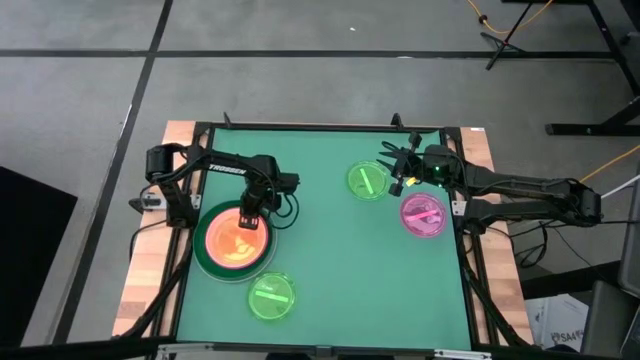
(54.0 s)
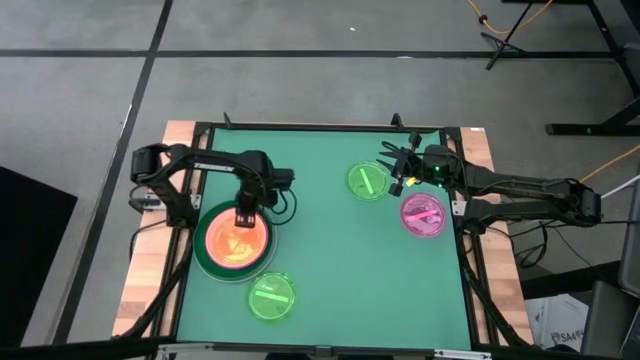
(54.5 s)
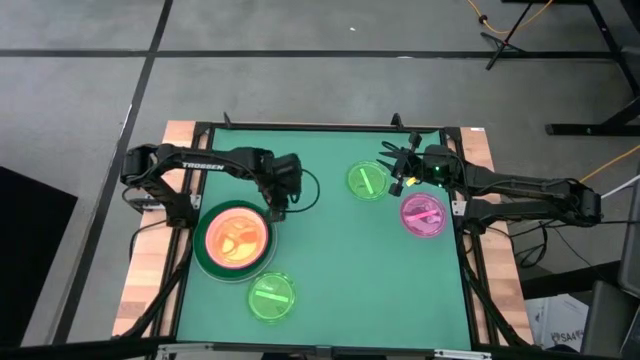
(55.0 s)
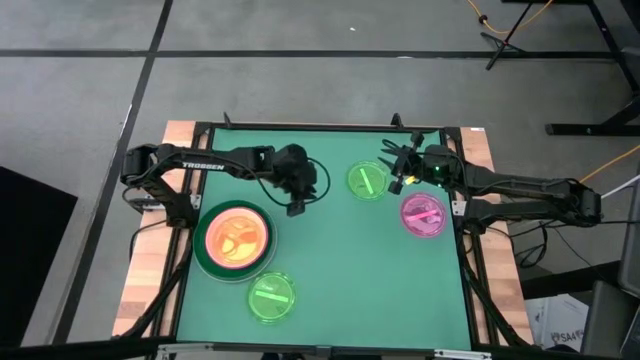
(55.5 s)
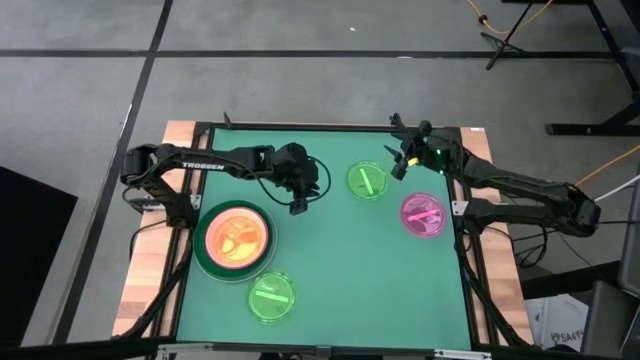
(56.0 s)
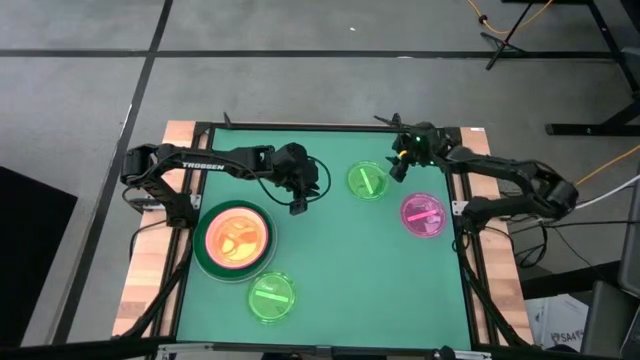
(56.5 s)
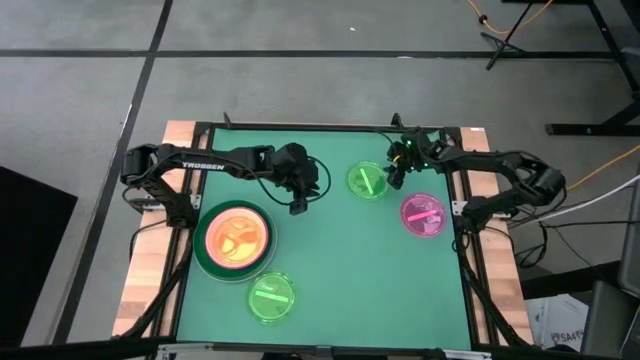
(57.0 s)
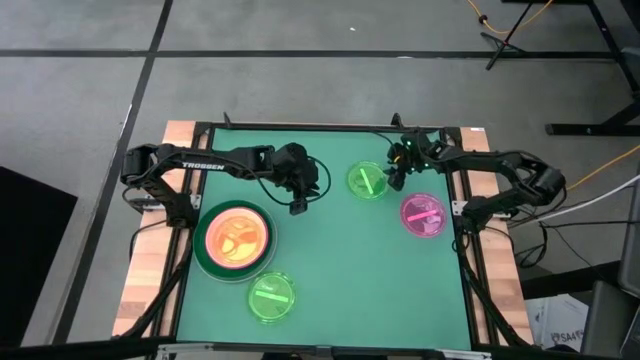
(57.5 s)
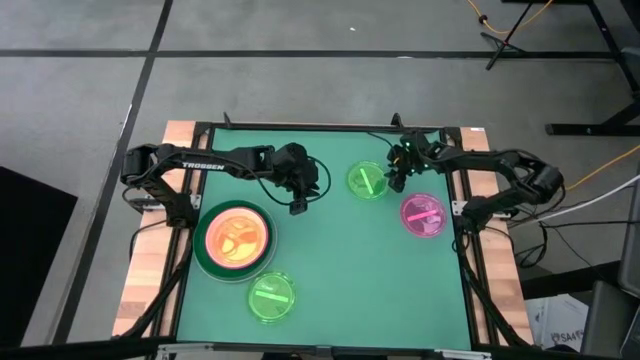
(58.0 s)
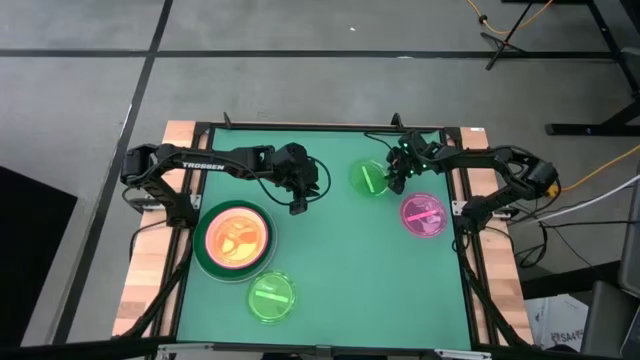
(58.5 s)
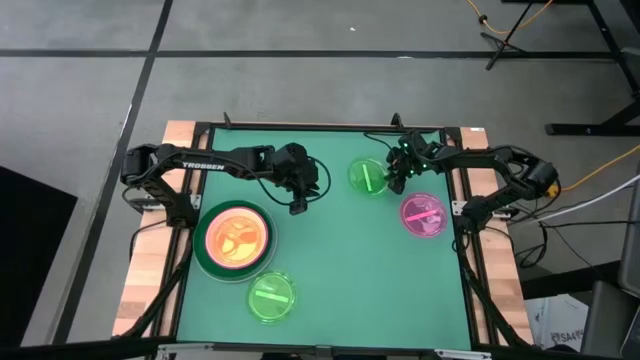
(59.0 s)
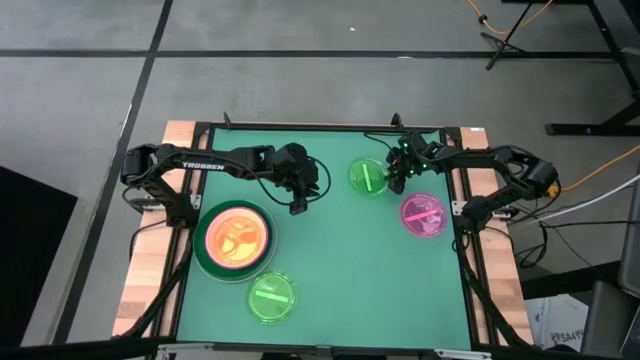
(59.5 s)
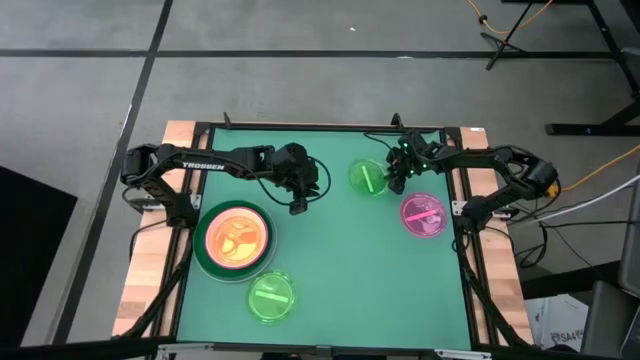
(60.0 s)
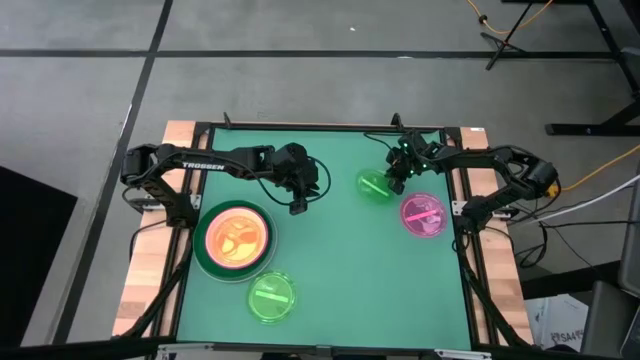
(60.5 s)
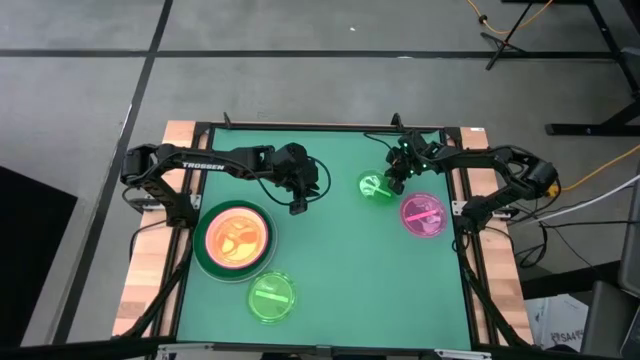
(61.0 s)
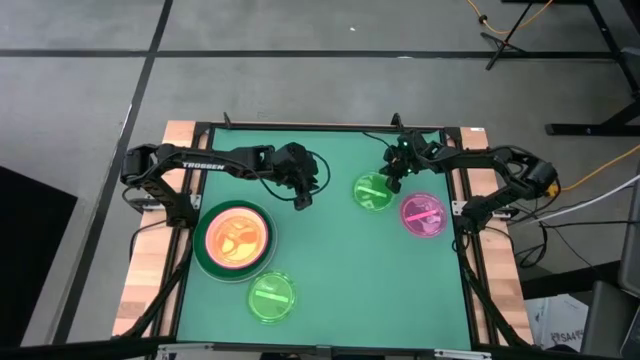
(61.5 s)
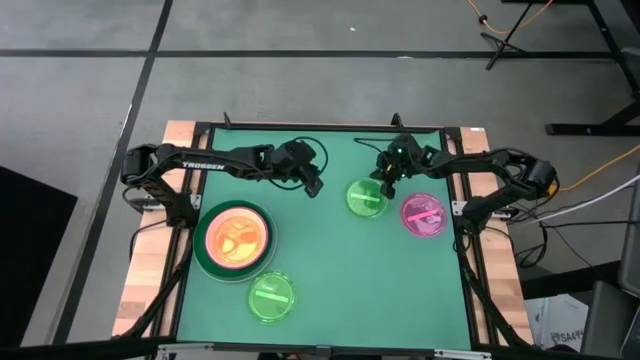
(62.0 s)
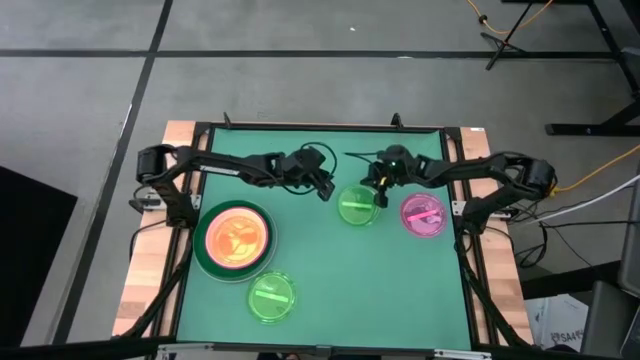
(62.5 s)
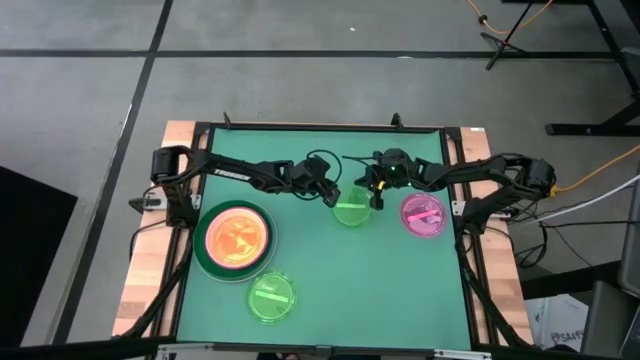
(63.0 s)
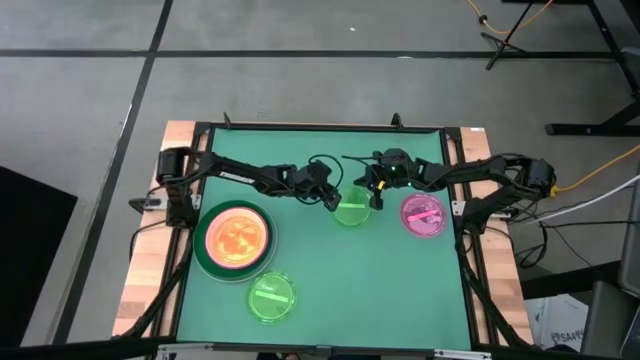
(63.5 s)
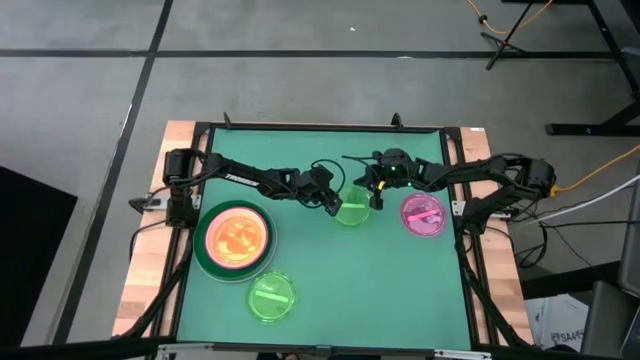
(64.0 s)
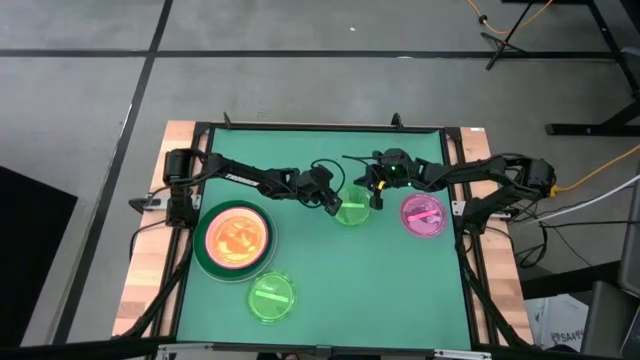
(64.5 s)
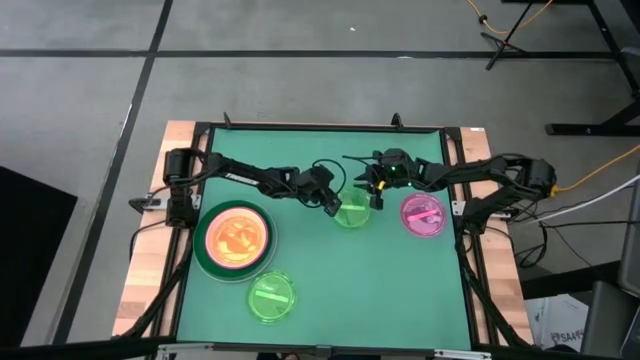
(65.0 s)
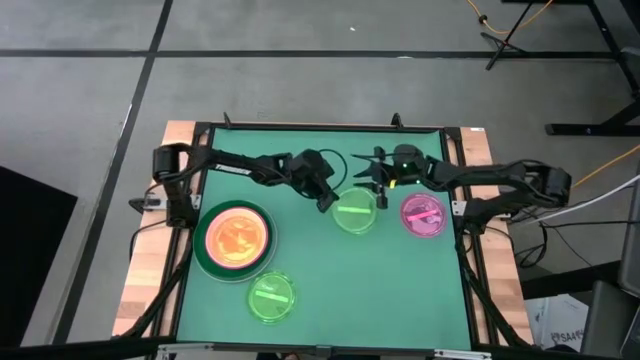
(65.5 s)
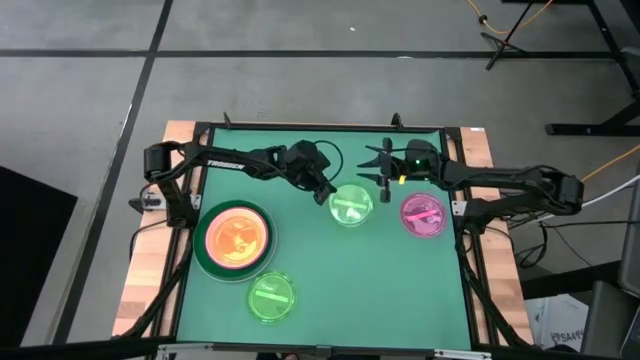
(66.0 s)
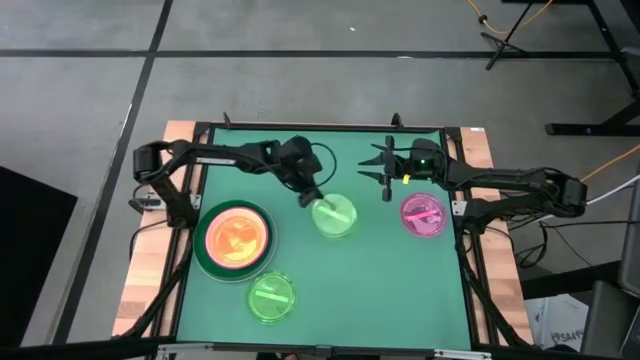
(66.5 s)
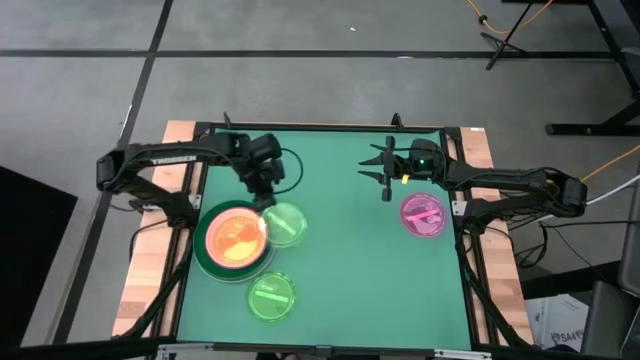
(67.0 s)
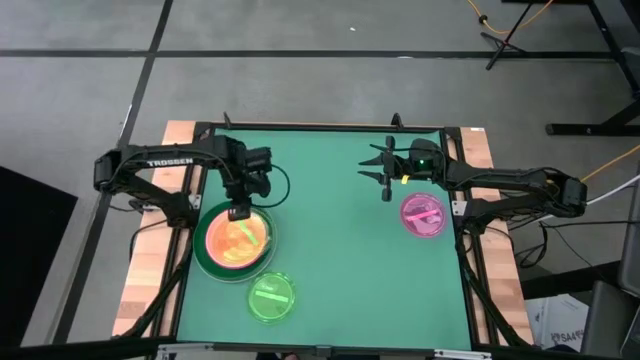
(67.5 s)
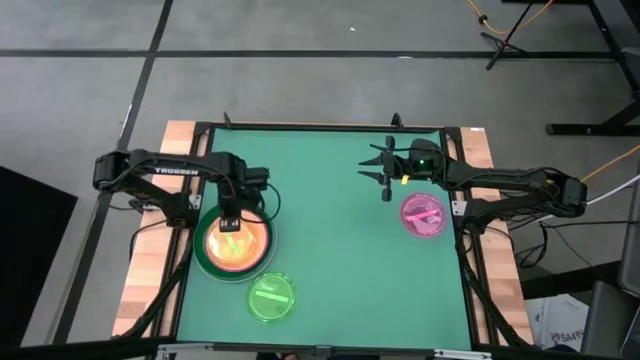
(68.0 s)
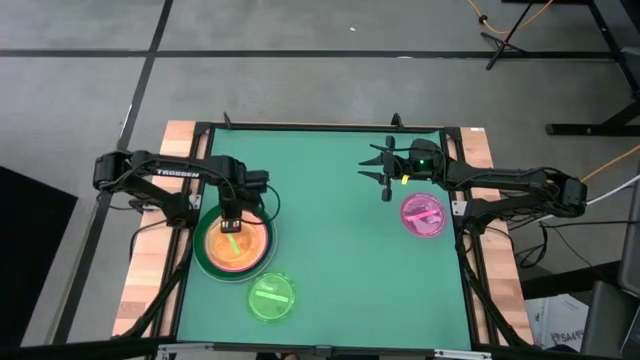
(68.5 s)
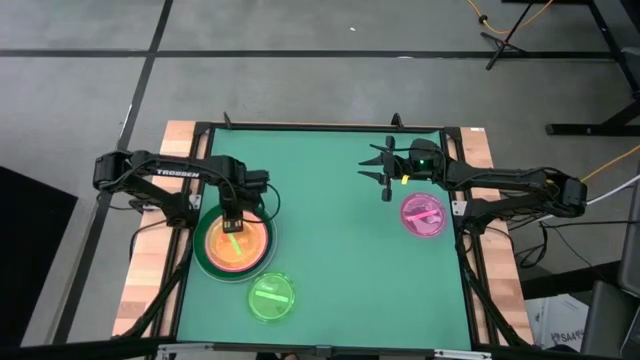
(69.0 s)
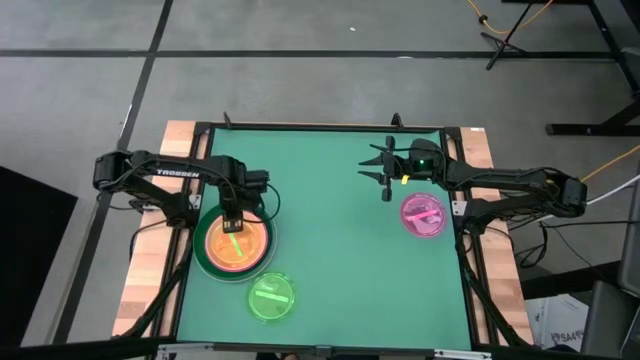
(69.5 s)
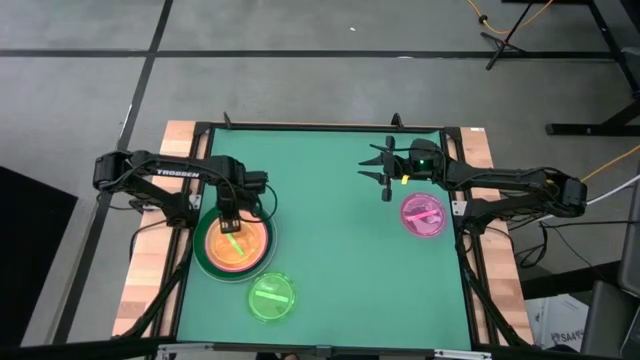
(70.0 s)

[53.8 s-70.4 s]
Task: Stack plastic plates
Stack the top light green plate on top of the orange plate

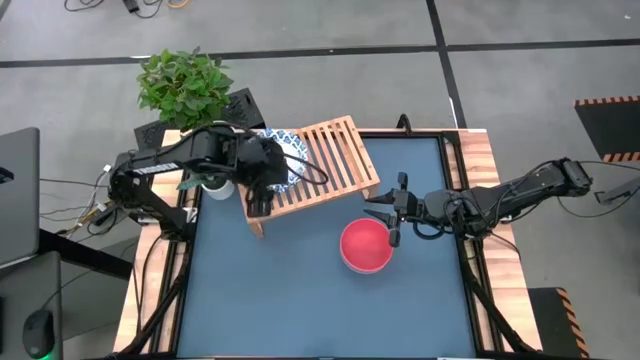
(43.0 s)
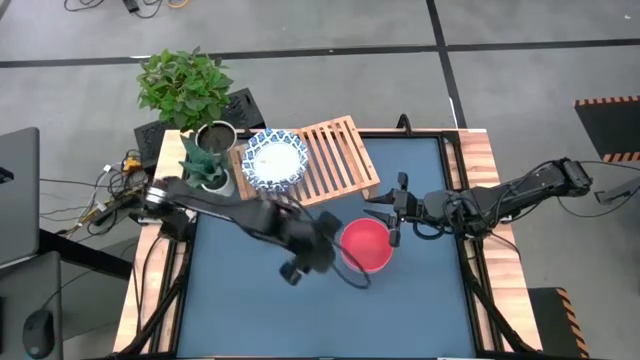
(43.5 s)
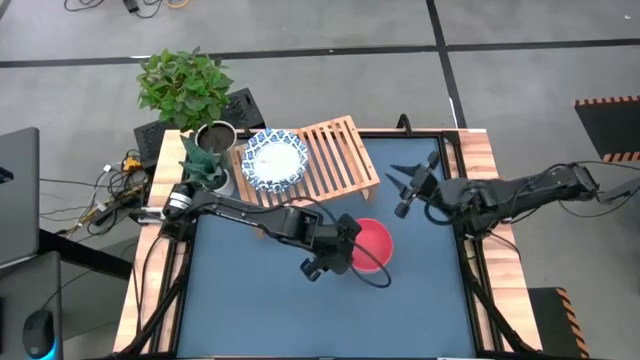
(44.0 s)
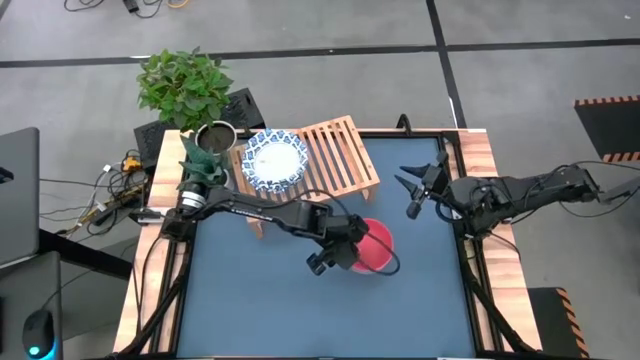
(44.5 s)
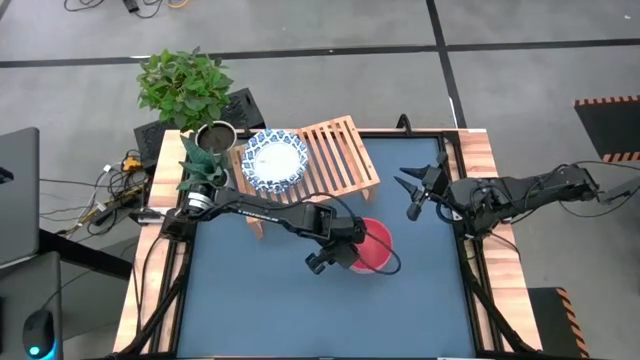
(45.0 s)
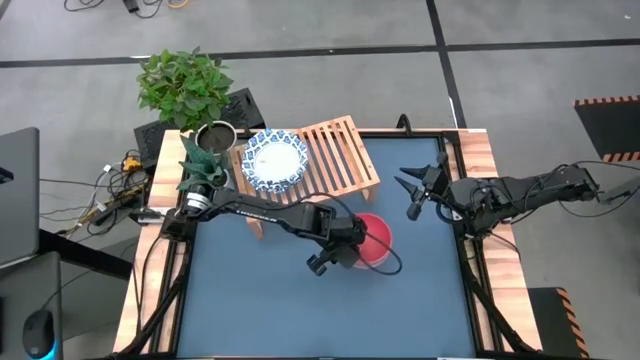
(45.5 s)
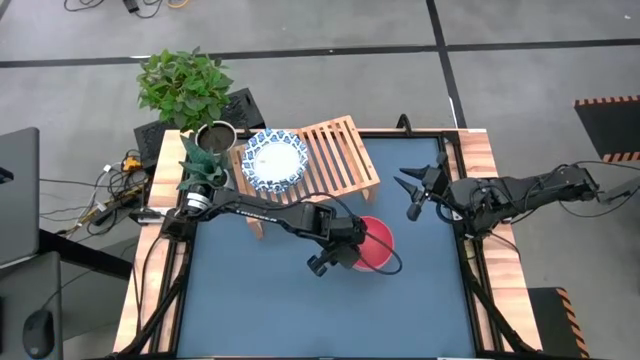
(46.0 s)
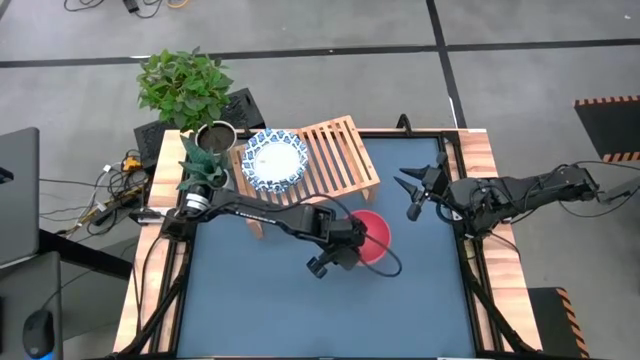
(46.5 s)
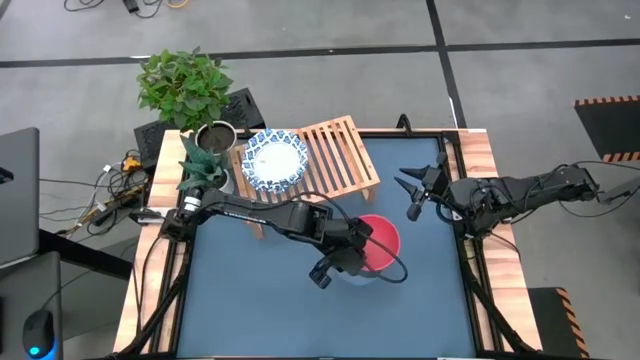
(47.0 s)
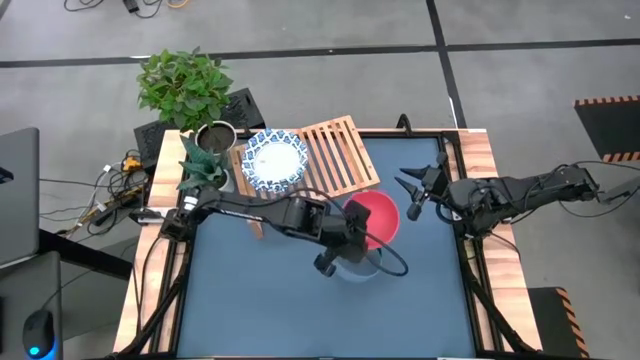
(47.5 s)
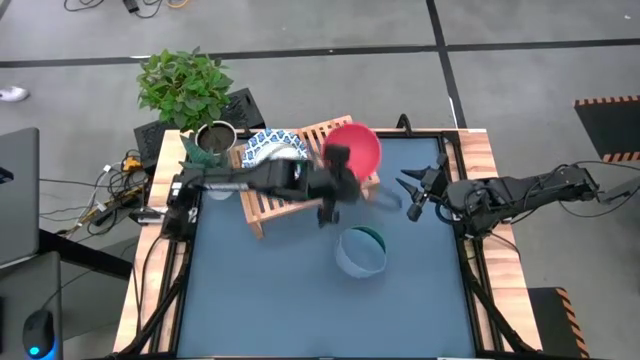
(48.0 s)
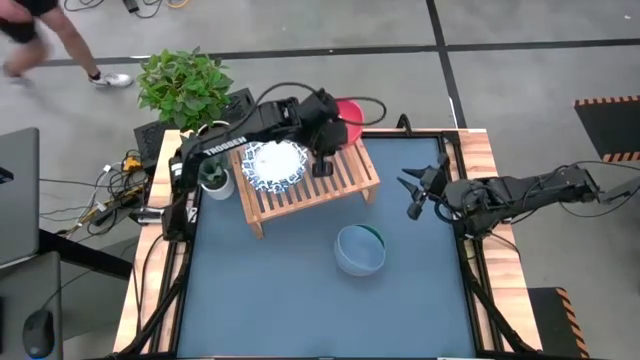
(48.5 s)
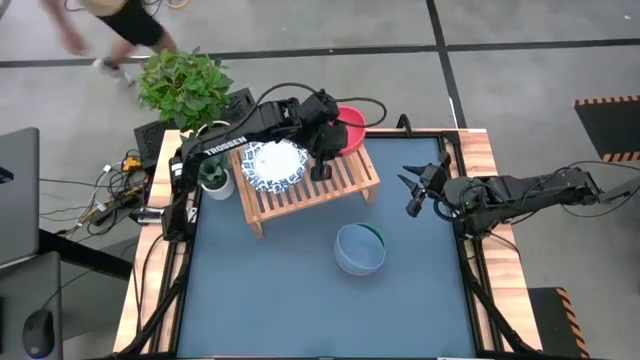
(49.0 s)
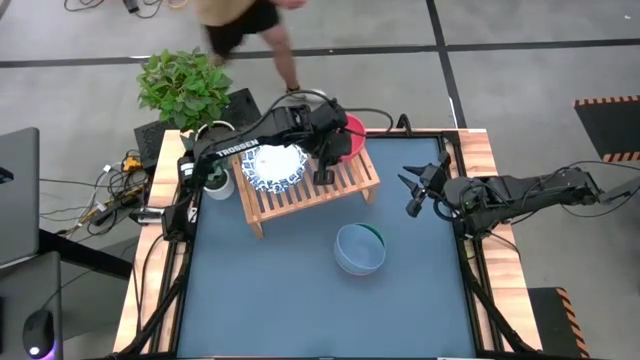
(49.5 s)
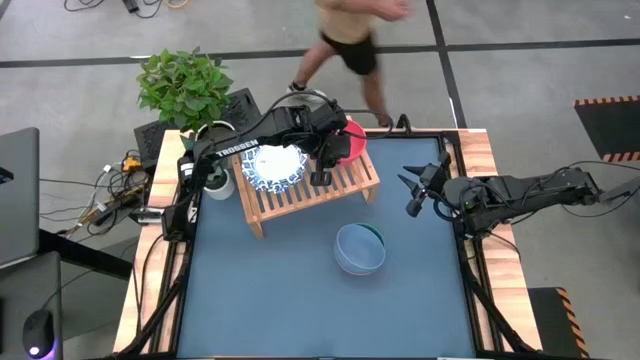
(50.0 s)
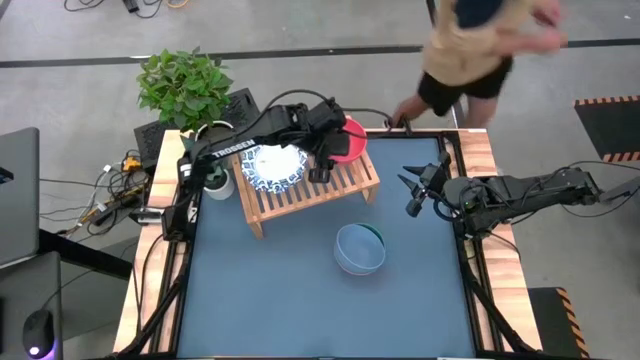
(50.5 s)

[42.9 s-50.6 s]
Task: Place and stack bowls onto a shelf
Put the orange bowl on the shelf
